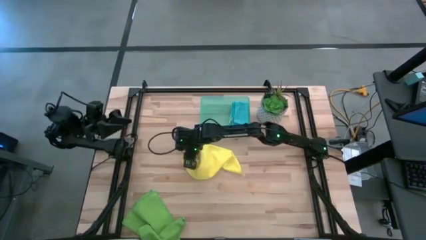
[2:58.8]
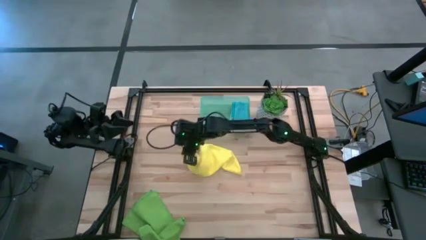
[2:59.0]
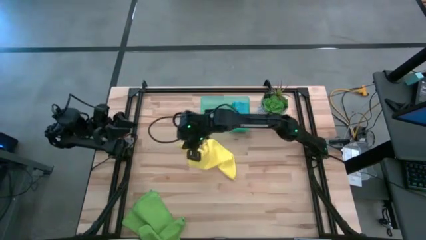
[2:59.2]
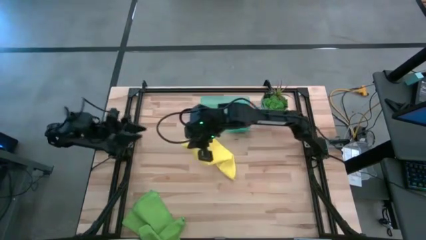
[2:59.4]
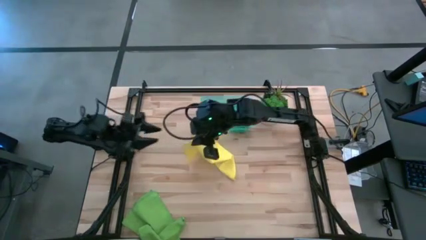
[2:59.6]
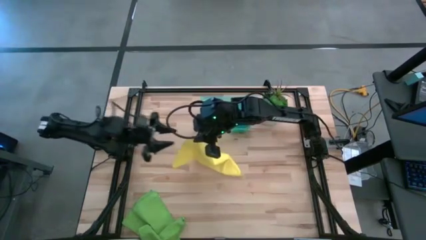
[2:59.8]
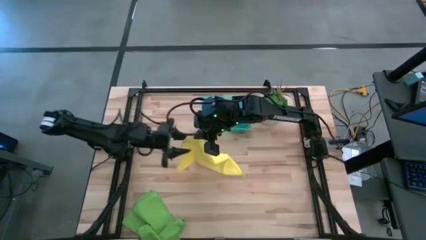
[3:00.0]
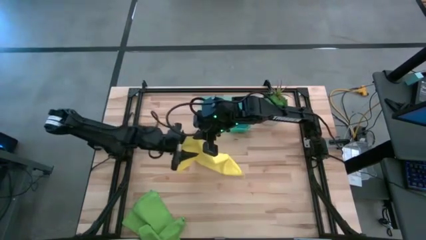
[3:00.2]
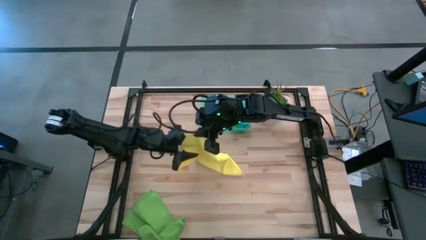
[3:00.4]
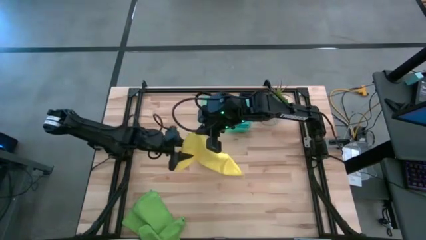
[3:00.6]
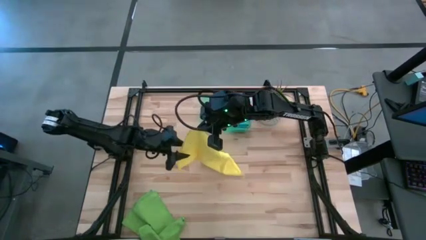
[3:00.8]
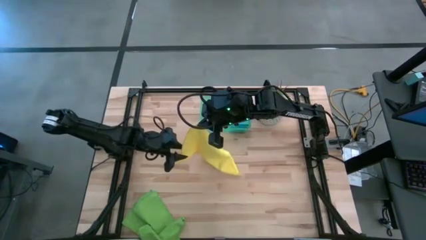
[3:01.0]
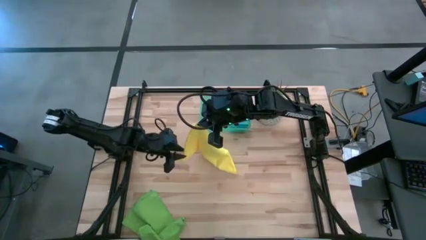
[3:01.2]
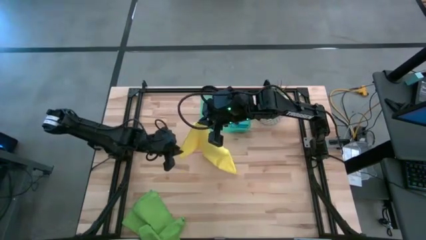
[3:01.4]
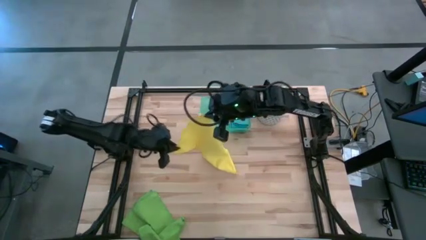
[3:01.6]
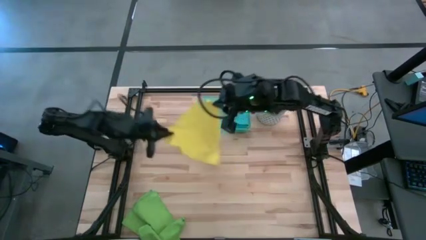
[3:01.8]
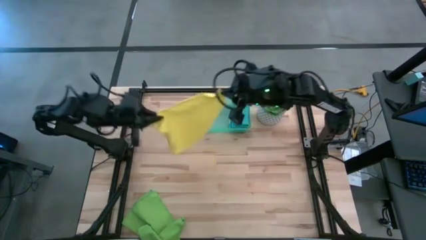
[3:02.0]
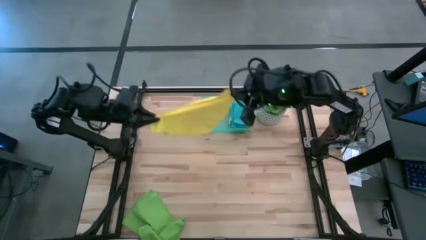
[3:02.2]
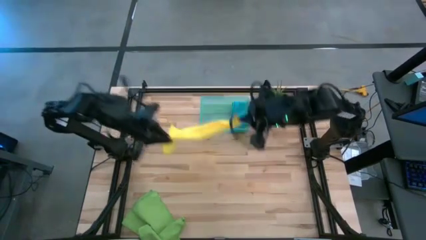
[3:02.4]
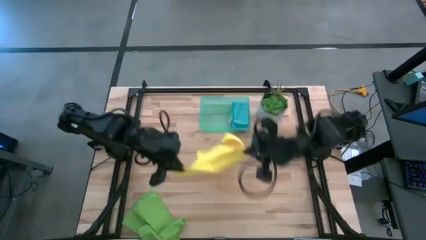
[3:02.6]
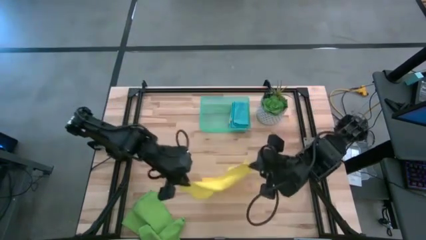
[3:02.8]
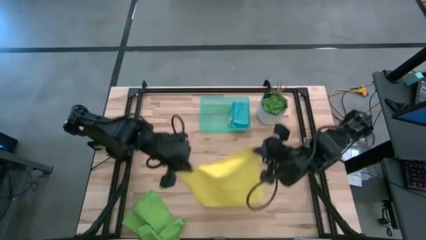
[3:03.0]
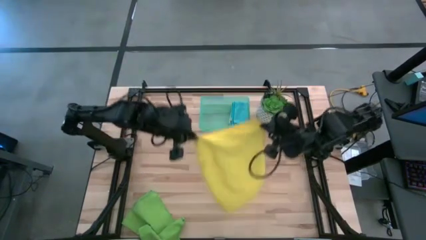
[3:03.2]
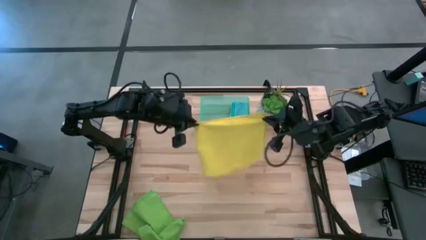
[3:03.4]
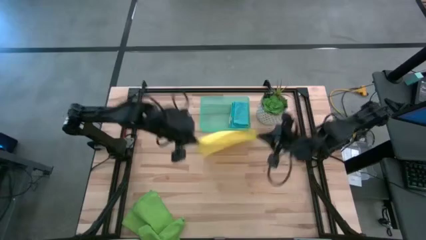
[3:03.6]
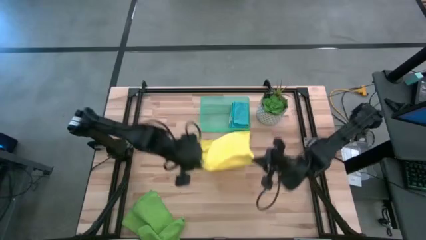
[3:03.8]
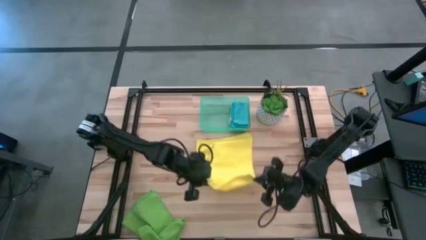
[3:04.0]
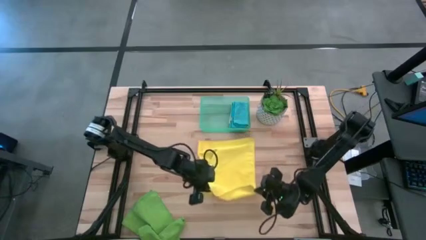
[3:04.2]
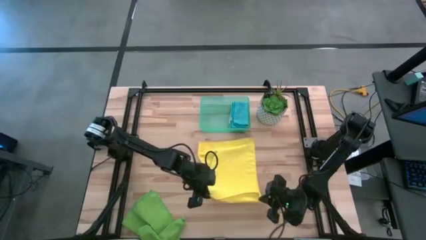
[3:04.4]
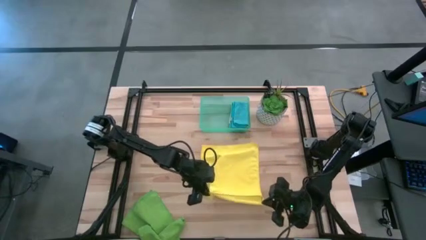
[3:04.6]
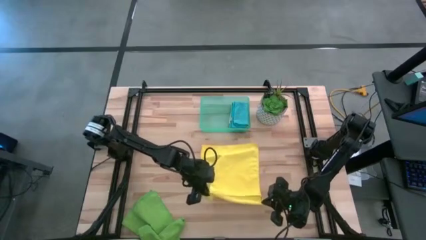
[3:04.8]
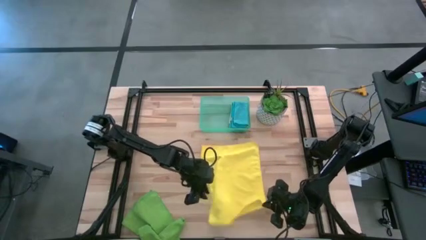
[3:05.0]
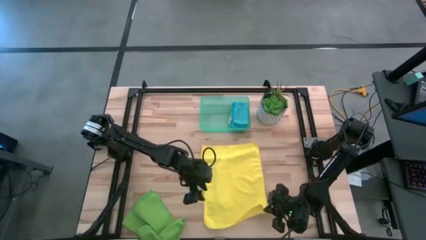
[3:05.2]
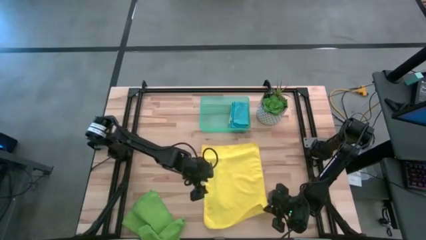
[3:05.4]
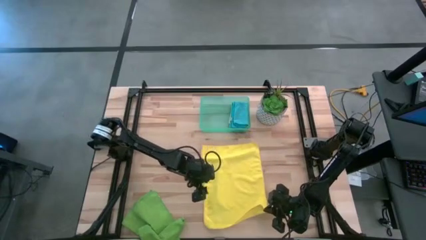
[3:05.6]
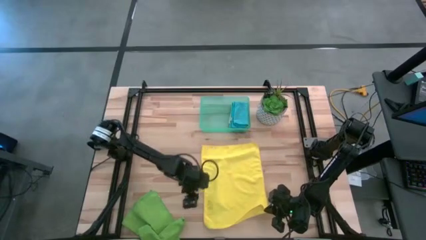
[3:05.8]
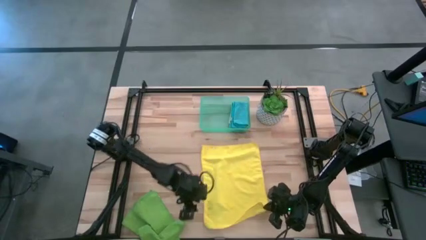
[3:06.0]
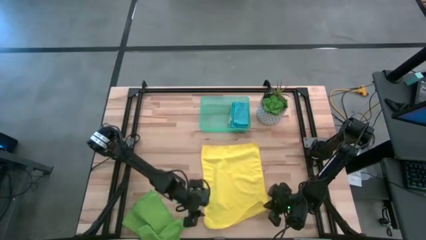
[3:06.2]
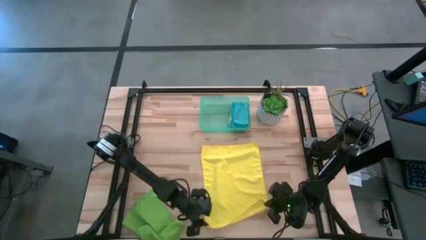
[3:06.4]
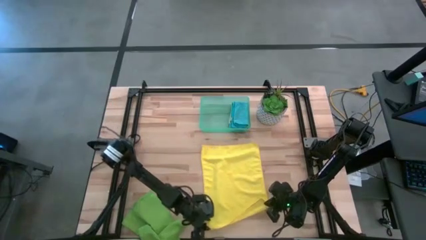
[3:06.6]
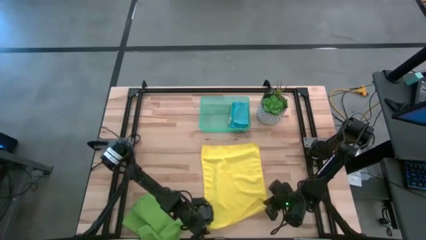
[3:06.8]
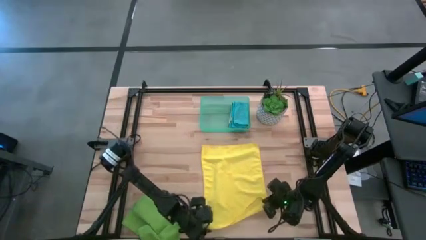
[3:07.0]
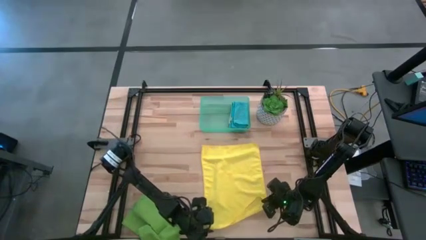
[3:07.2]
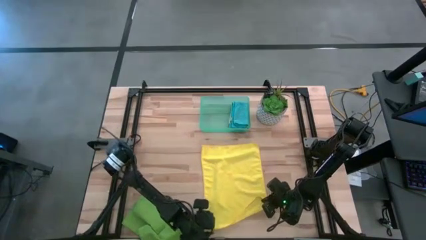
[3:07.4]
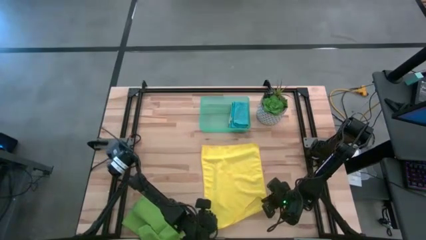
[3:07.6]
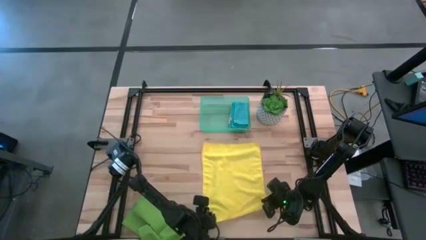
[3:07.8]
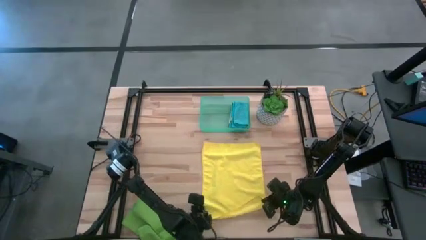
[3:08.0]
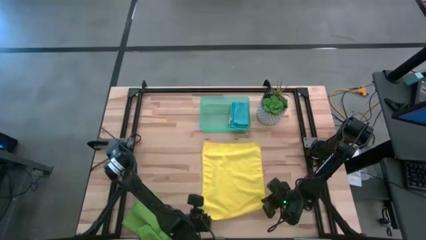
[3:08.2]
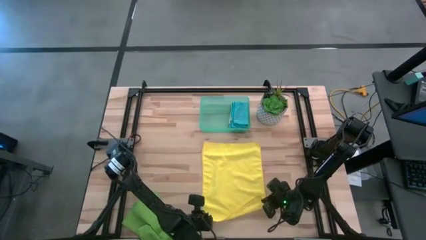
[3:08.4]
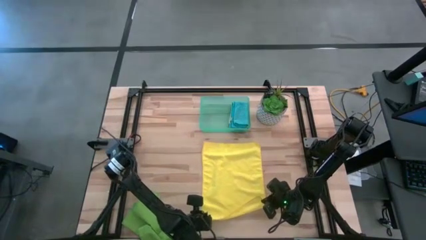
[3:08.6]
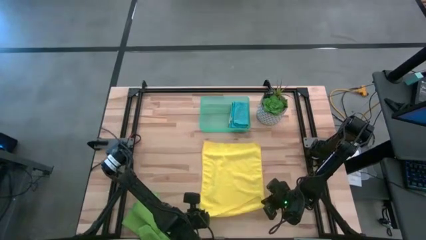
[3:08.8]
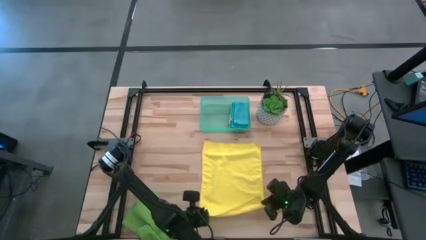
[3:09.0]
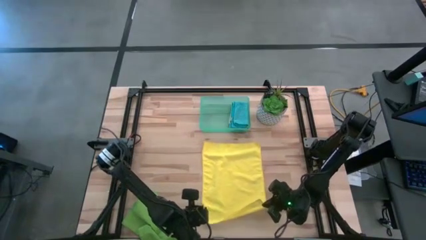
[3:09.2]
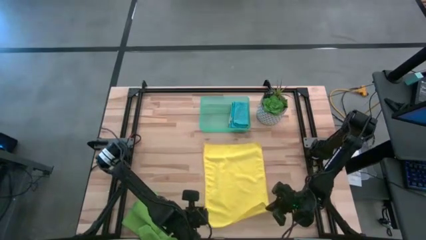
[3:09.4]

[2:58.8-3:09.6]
Task: Fold microfiber towels
Fold the yellow microfiber cloth

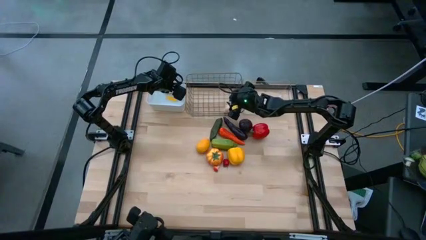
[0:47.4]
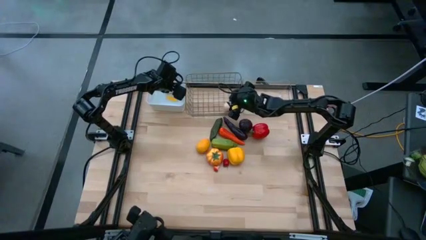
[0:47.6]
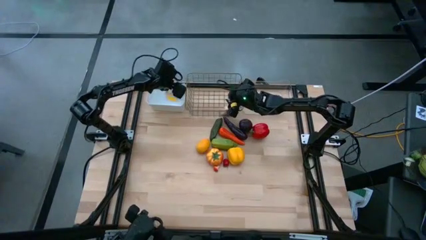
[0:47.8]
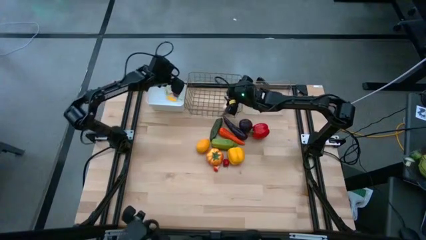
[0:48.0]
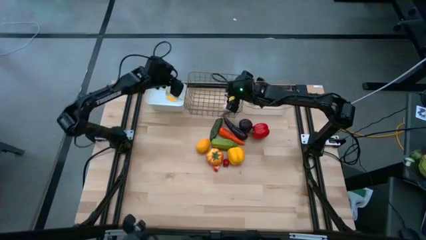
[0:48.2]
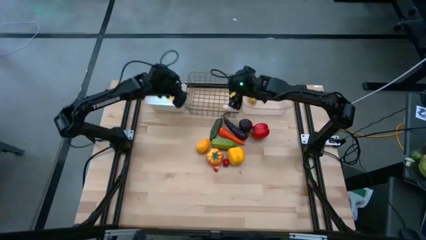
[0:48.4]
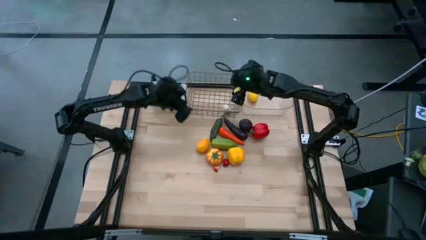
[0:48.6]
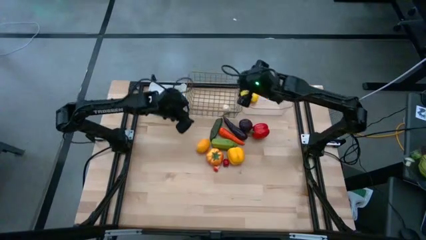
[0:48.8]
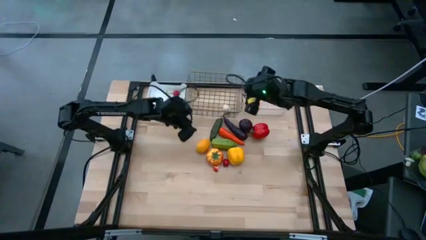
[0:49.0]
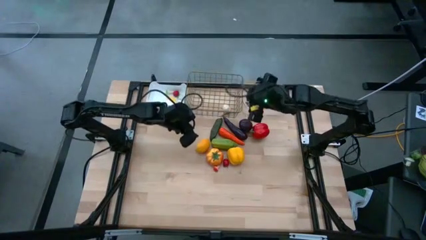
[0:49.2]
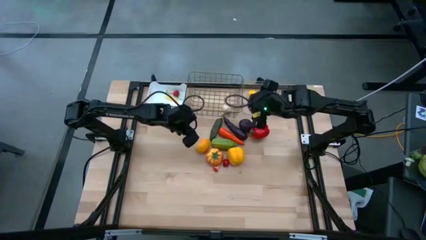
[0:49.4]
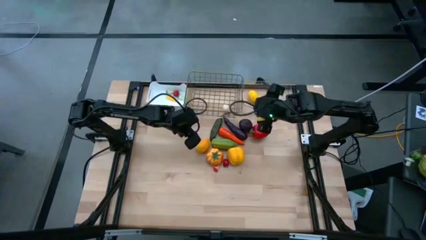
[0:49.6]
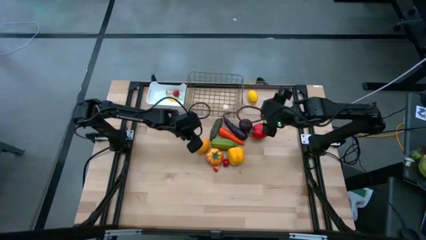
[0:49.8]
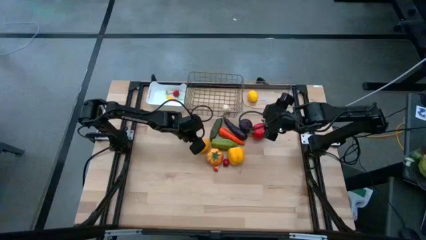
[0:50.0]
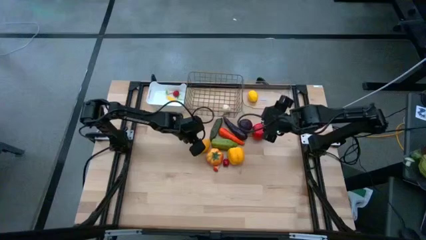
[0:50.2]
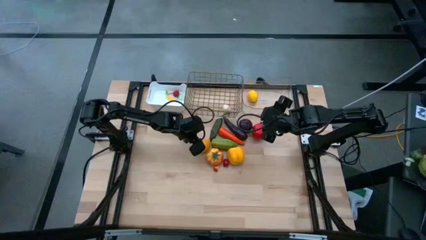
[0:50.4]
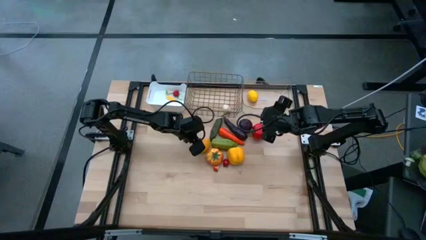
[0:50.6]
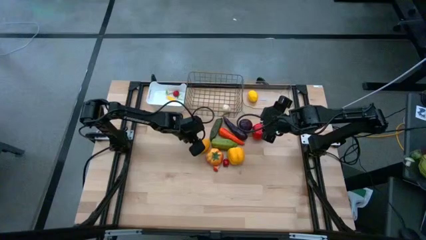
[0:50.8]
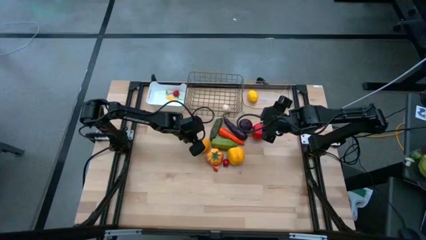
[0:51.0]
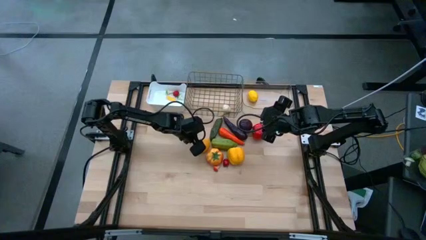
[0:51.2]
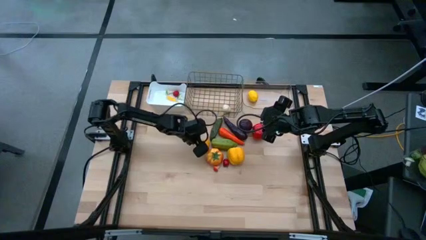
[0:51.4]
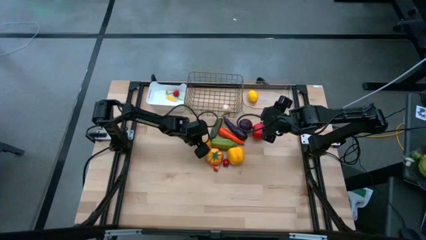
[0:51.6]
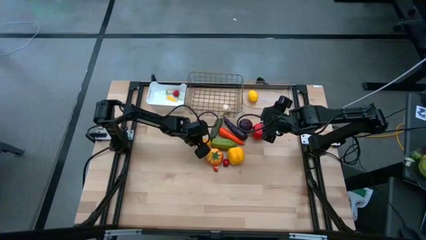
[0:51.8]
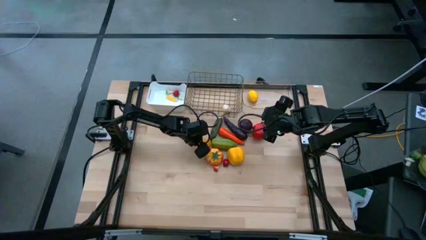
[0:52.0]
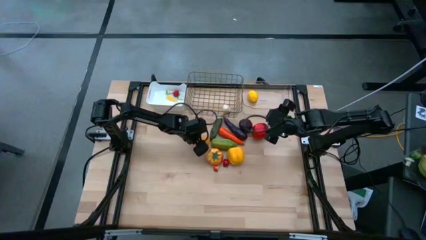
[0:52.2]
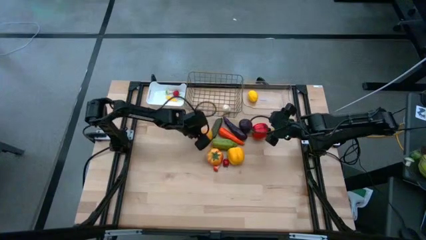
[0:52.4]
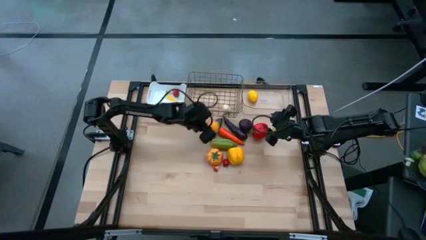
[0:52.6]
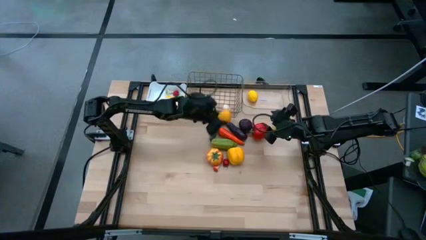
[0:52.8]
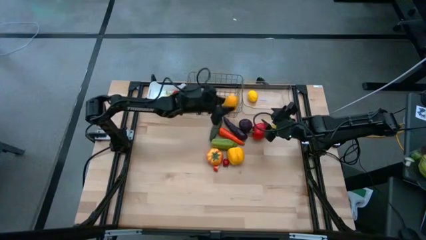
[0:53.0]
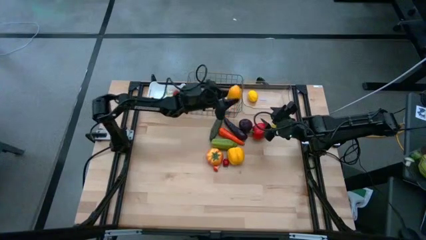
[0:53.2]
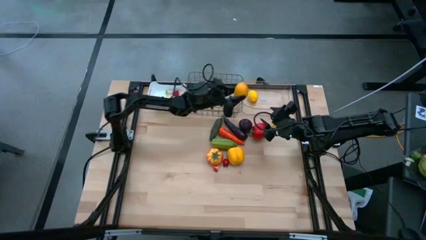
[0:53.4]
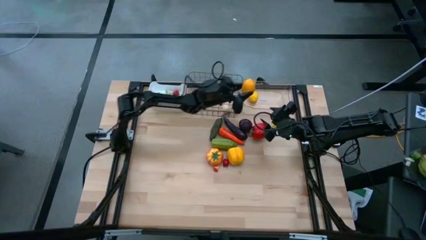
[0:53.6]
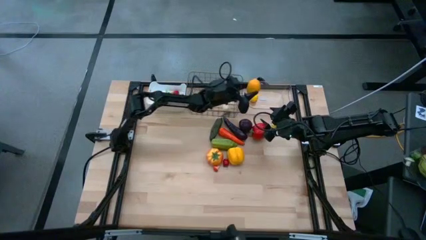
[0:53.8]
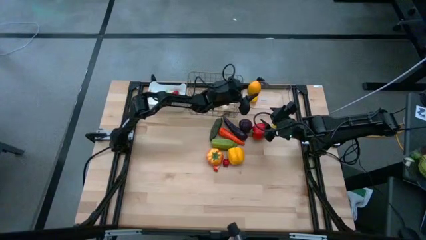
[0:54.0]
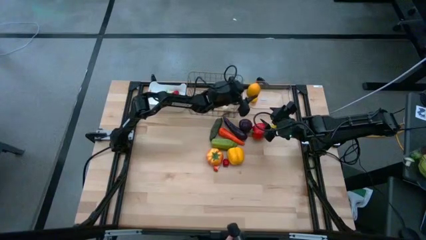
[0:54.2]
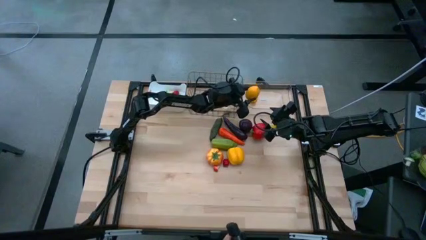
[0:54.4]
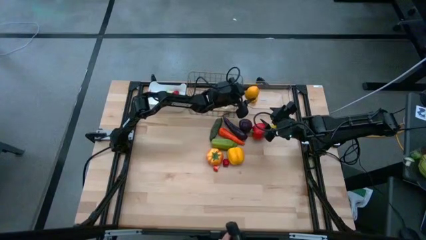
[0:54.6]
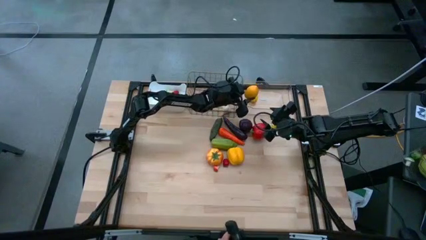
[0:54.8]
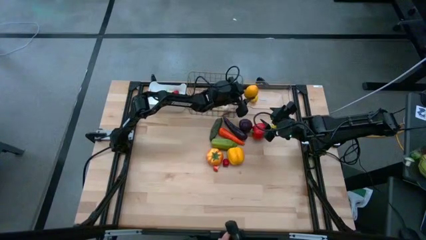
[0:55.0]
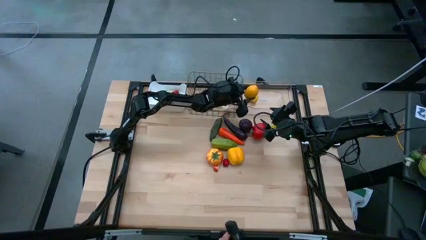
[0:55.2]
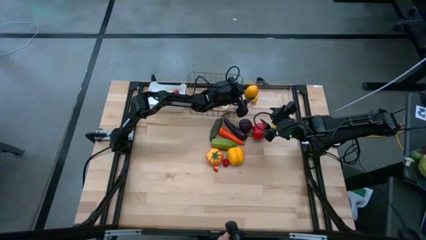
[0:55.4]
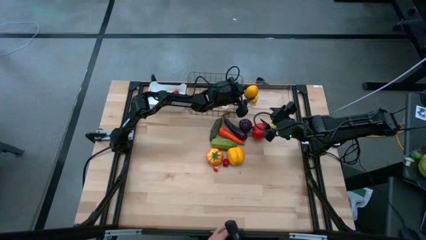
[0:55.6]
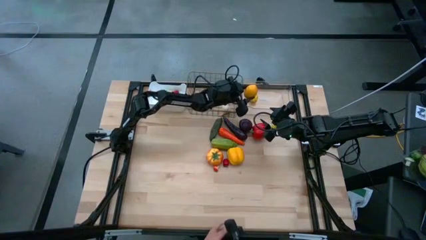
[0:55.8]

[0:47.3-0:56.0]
Task: Sort produce into baskets
Put the yellow lemon into the transparent bin
